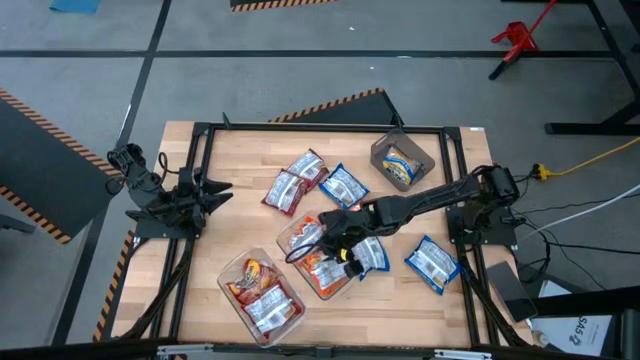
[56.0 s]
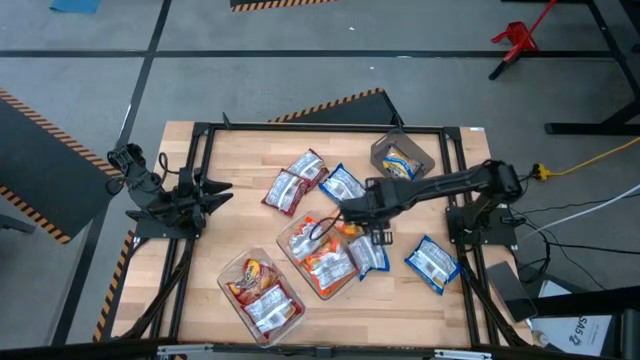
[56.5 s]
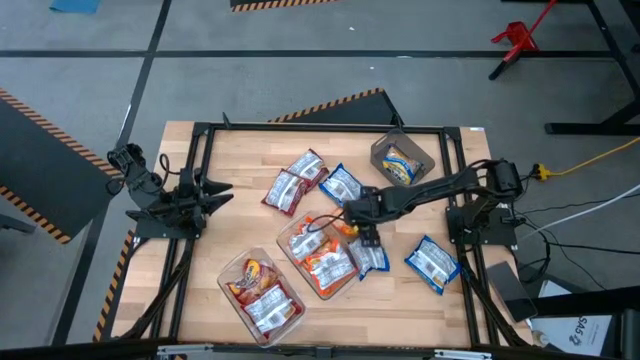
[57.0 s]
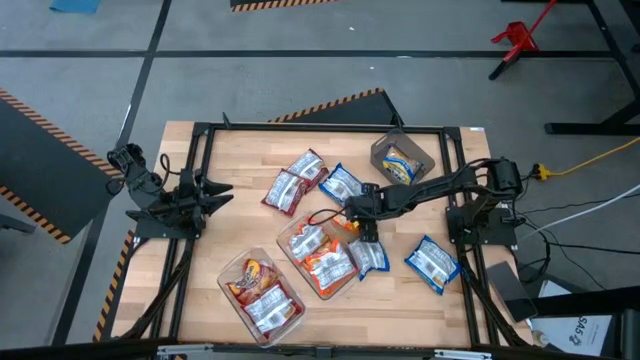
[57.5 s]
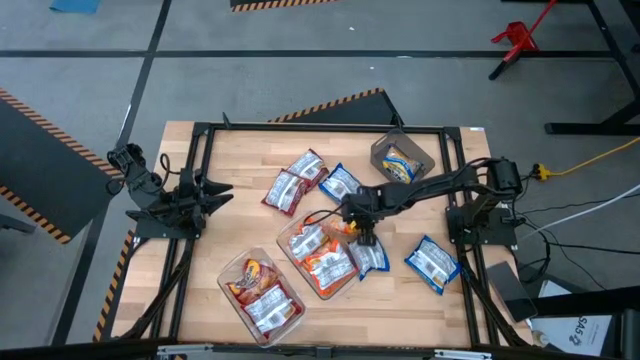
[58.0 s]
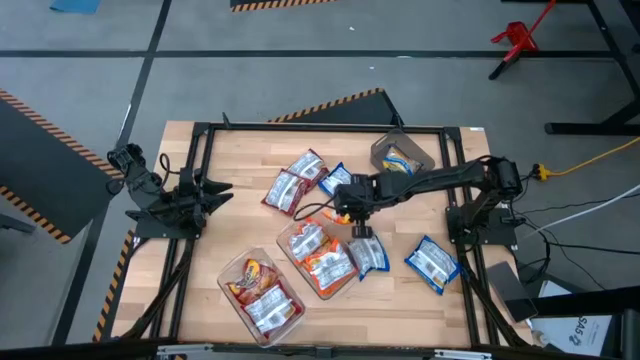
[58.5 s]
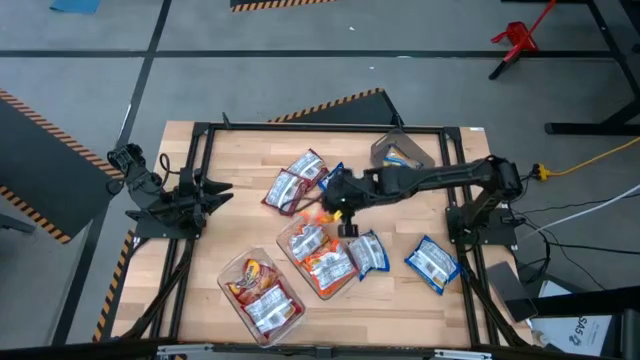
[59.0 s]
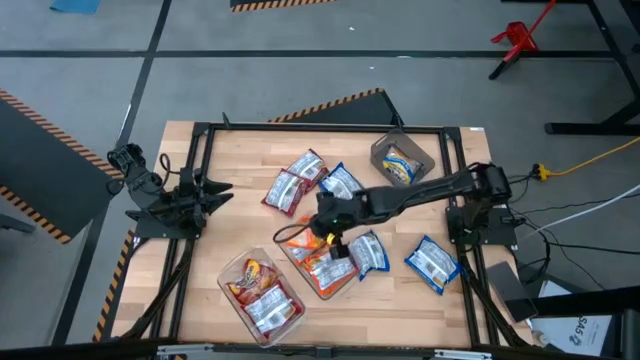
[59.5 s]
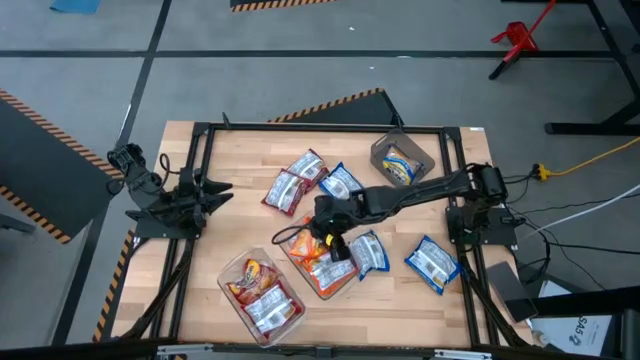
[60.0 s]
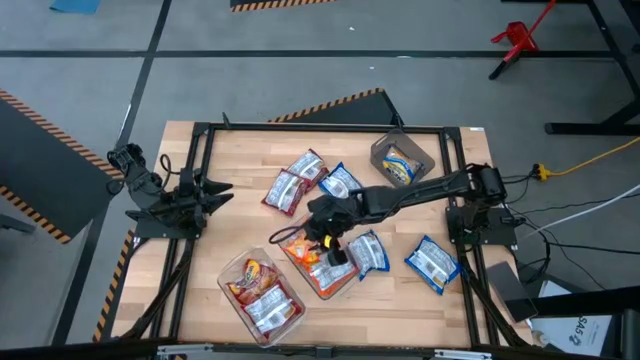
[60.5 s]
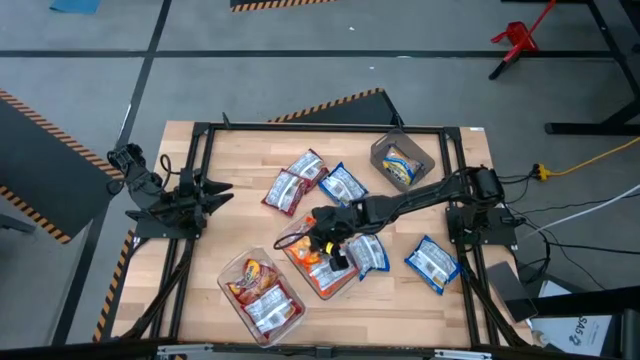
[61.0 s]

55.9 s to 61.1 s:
Task: Sort Maruchan noodles
Put the orange noodle pack into the the top transparent bin

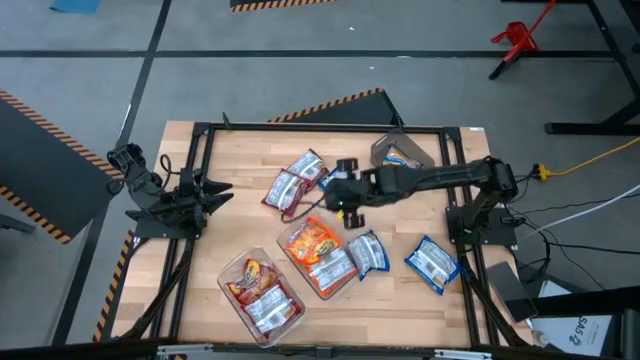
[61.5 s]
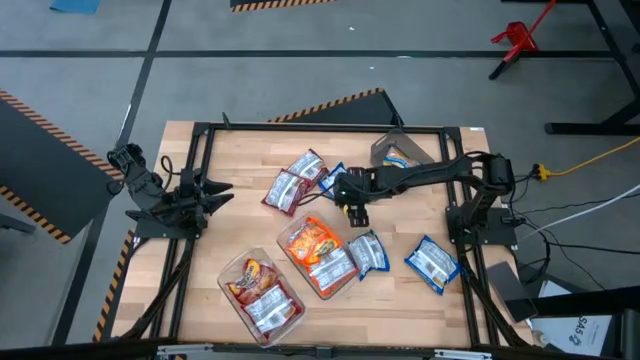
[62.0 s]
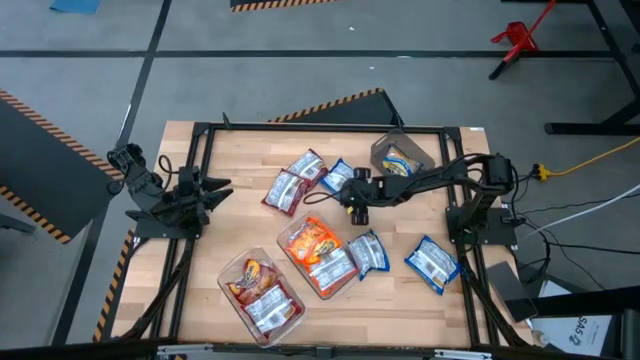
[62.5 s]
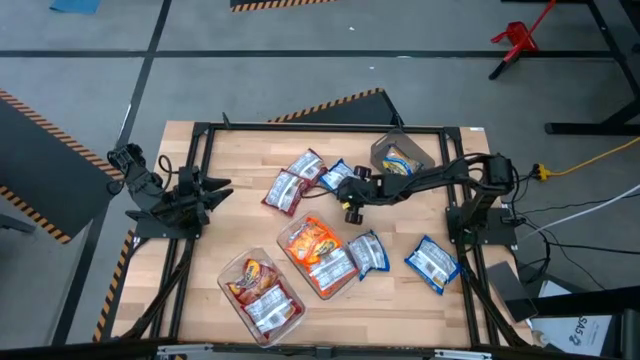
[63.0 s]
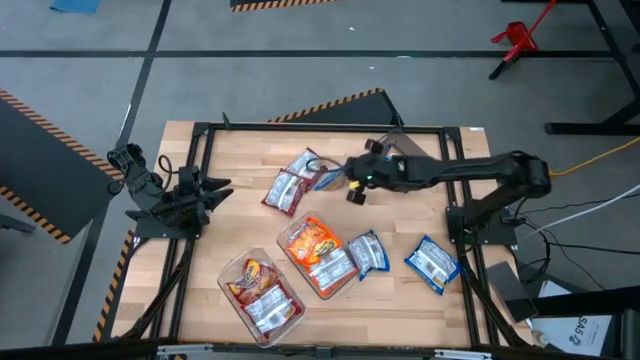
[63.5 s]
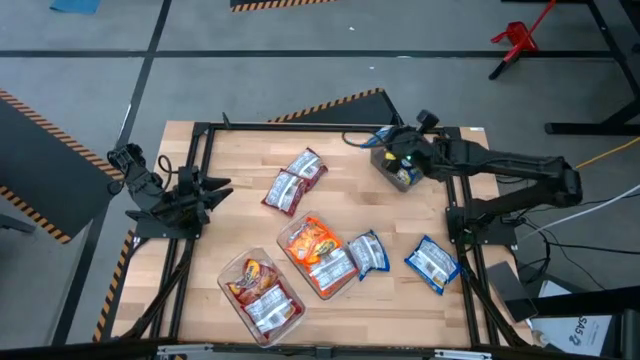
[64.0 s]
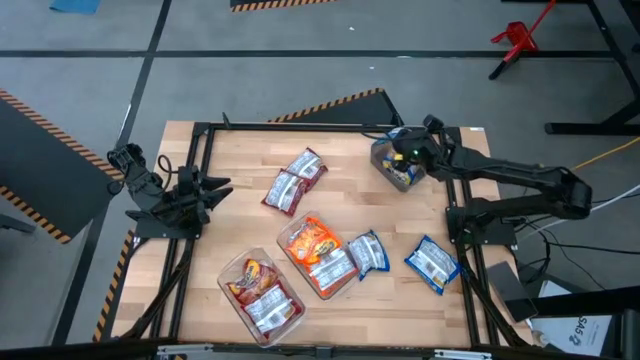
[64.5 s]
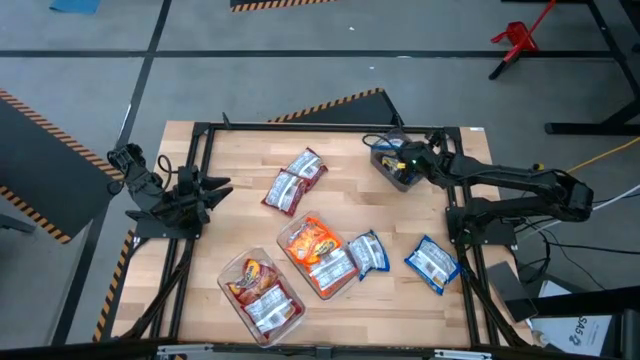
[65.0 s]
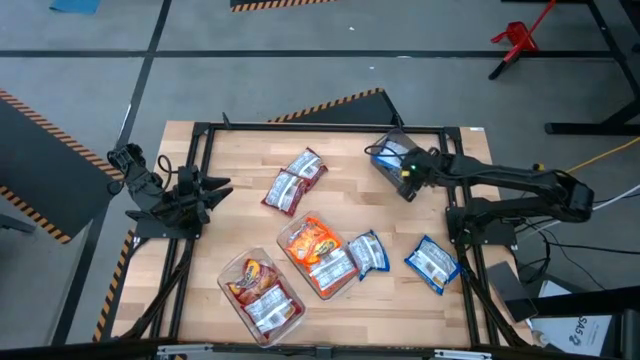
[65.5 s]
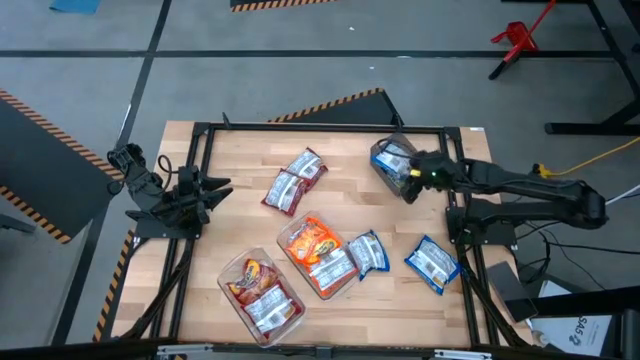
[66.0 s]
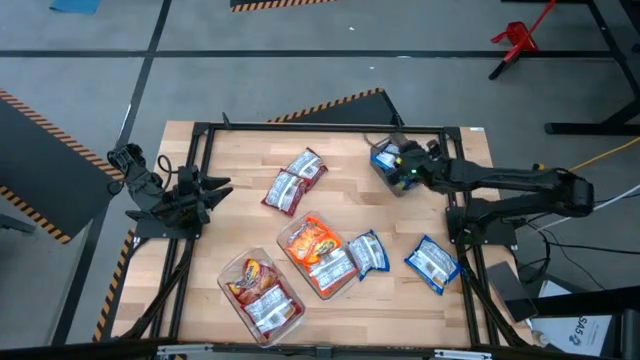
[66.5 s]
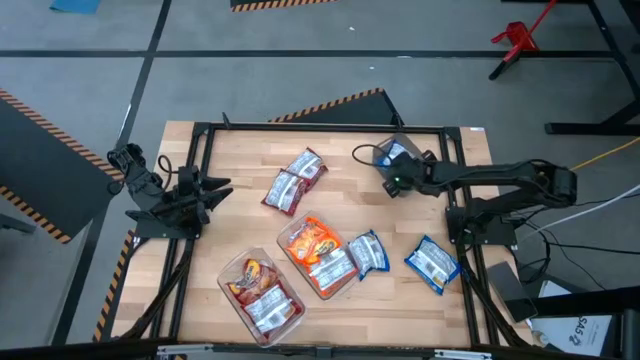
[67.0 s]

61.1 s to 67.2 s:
Put the blue noodle pack into the black bin

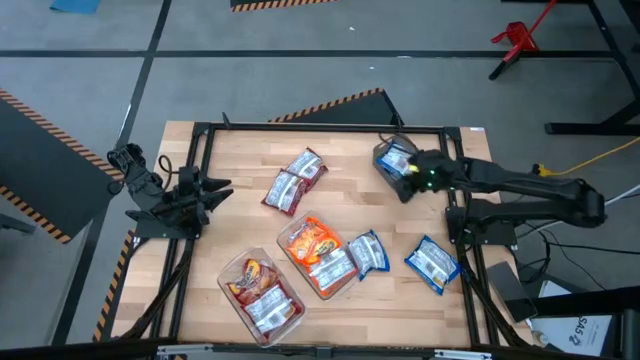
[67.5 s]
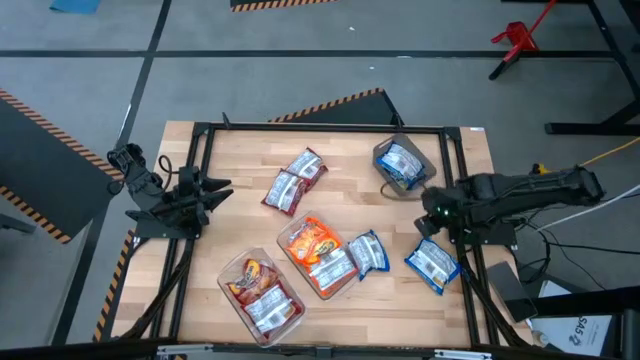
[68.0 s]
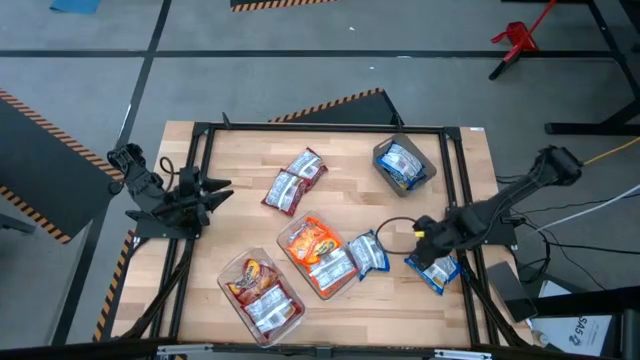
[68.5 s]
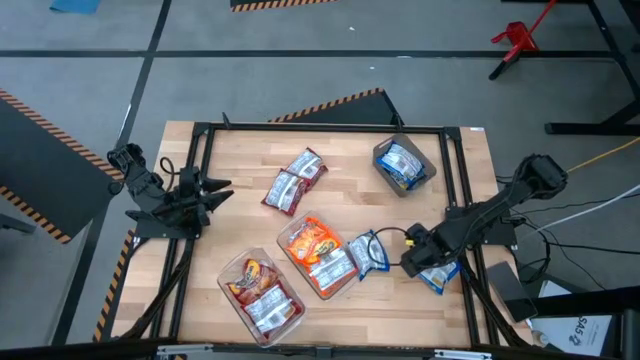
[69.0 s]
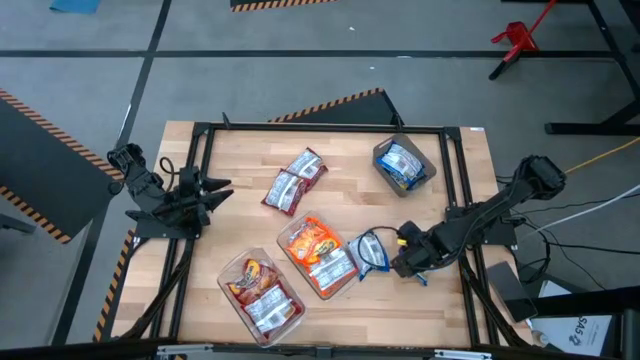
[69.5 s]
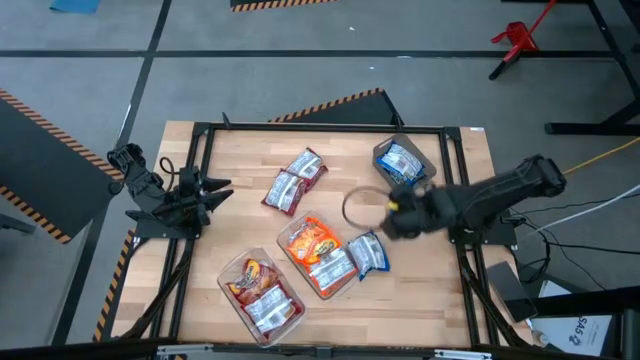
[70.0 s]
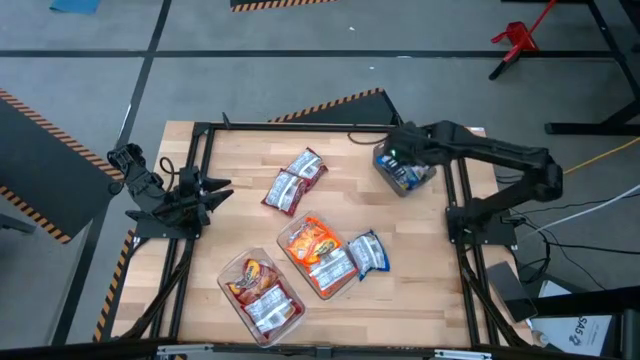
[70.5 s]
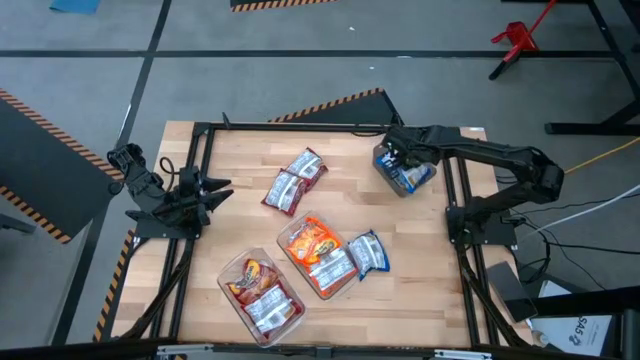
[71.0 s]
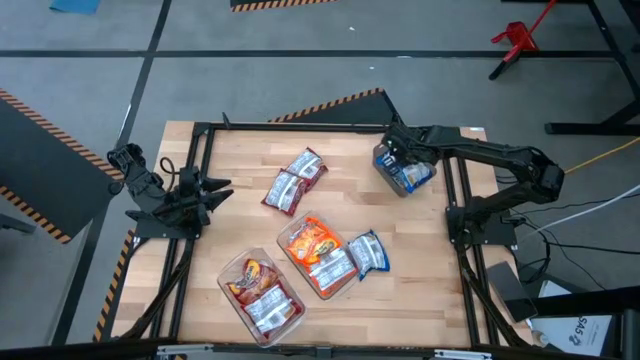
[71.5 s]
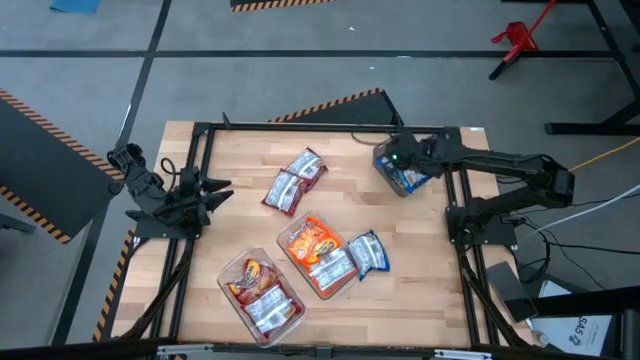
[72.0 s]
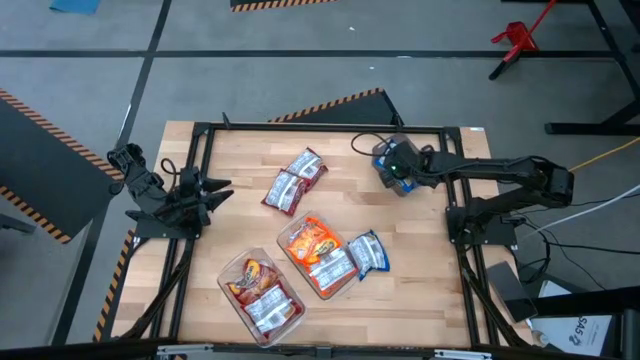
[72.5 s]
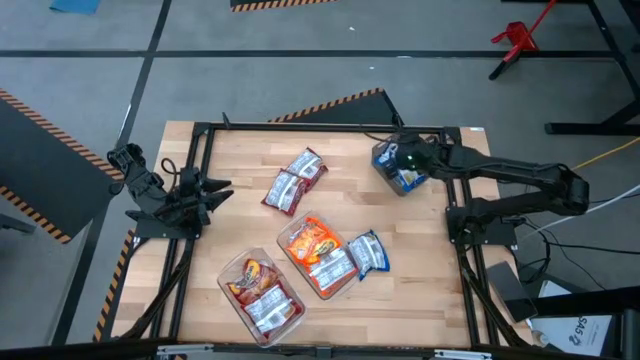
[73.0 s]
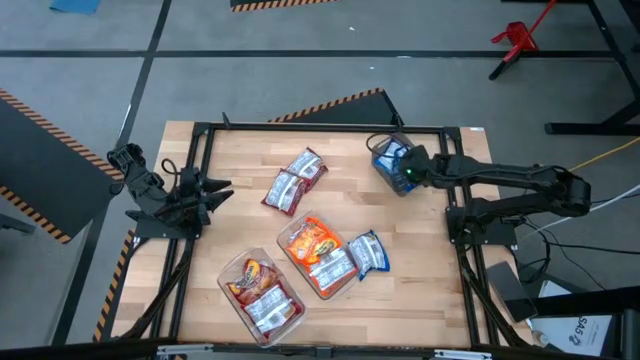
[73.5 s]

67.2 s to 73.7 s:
Put the blue noodle pack into the black bin

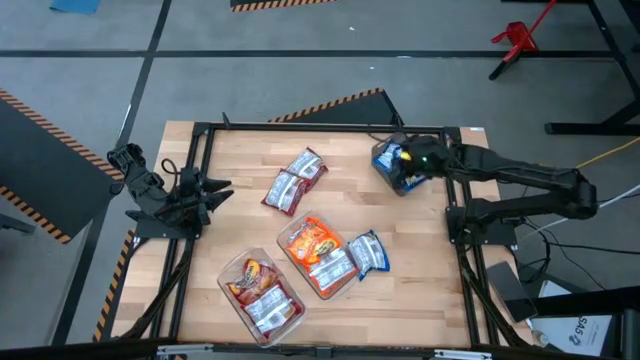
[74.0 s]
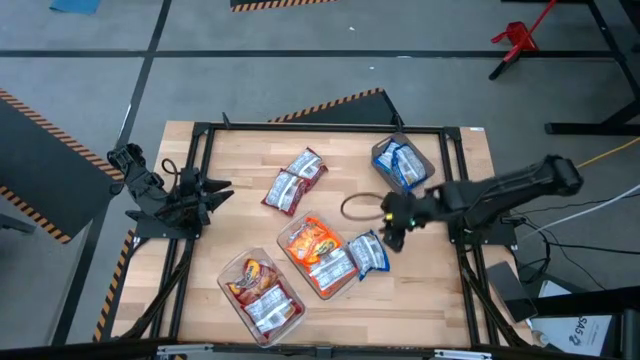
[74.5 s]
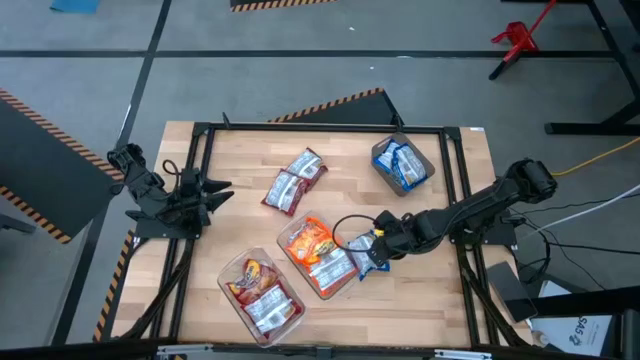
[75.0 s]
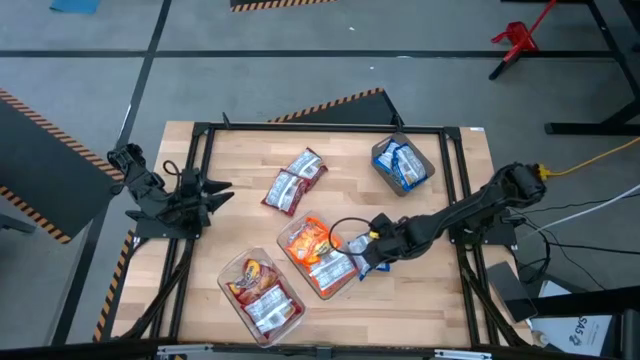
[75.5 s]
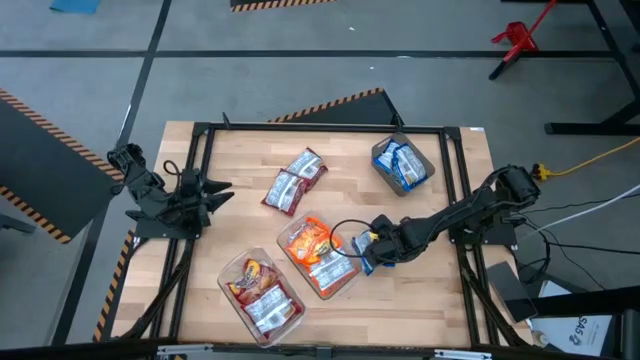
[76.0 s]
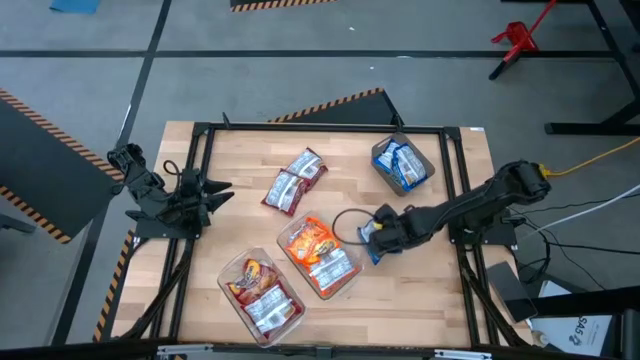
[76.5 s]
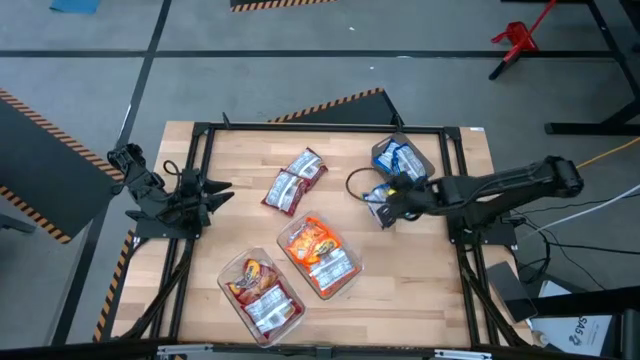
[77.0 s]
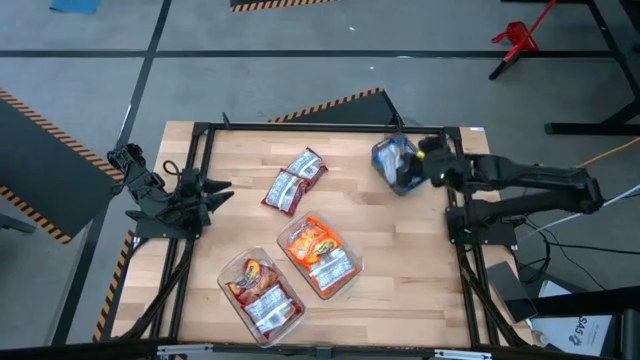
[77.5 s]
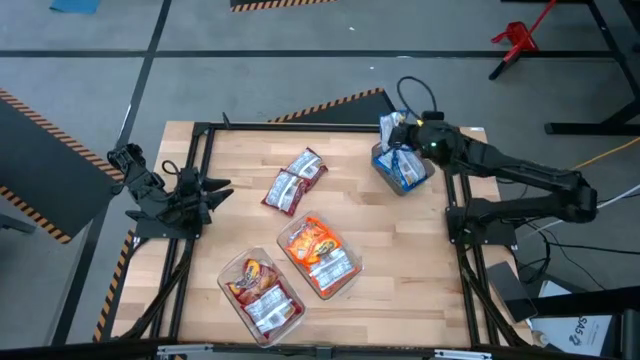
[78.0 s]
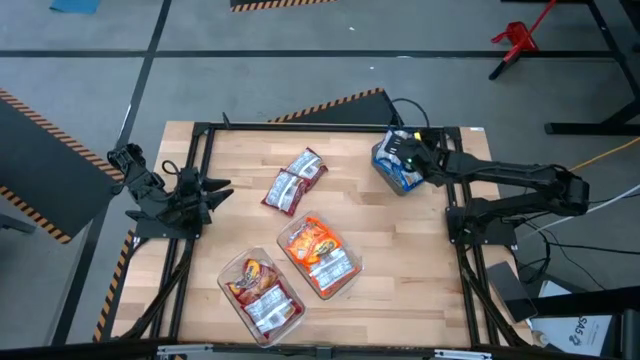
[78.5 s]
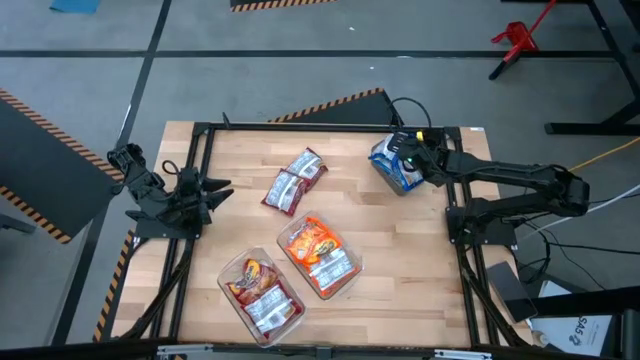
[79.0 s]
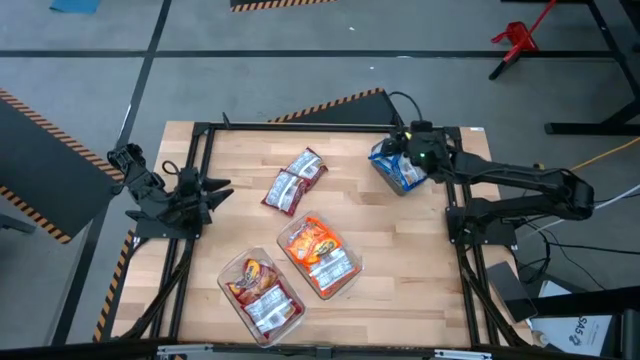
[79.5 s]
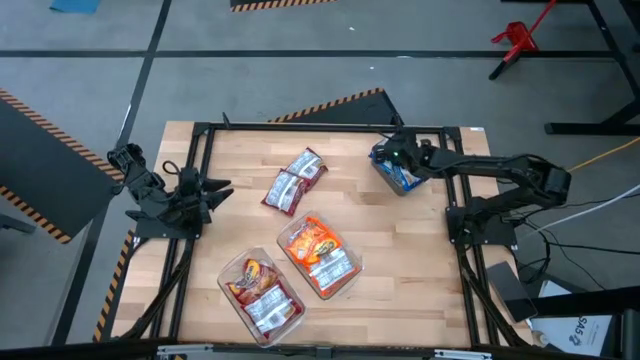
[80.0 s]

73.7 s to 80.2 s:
Put the blue noodle pack into the black bin
